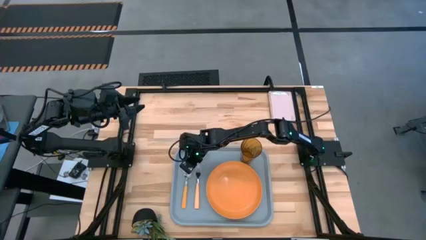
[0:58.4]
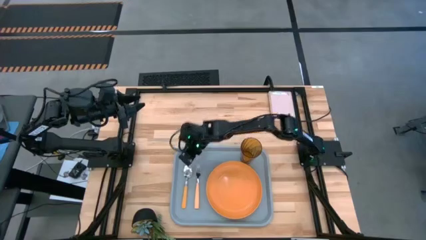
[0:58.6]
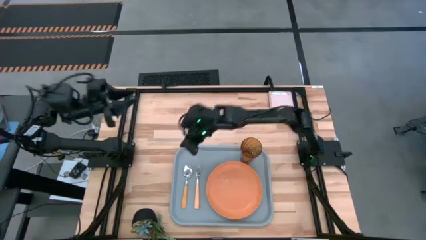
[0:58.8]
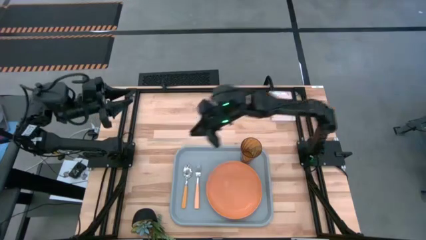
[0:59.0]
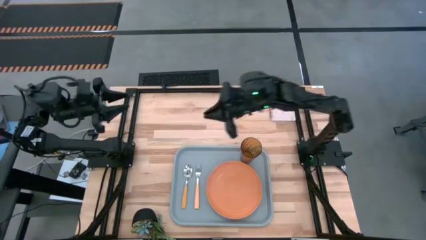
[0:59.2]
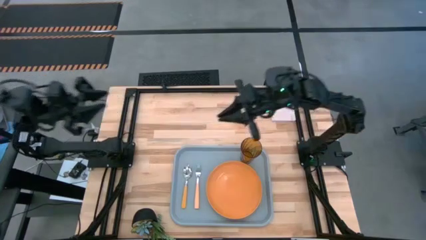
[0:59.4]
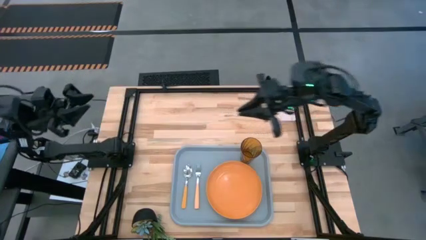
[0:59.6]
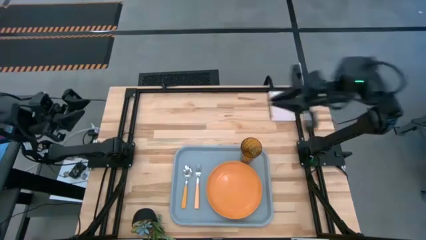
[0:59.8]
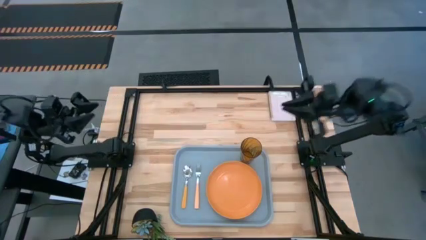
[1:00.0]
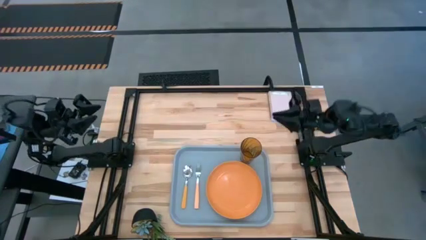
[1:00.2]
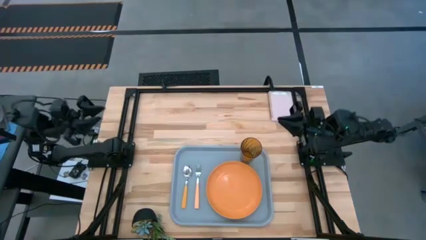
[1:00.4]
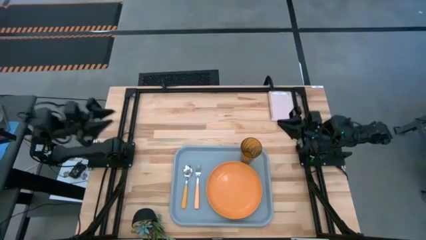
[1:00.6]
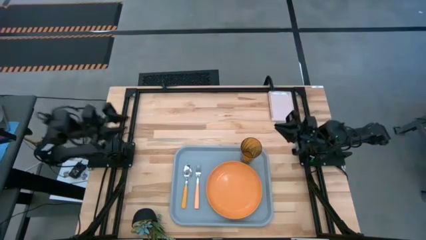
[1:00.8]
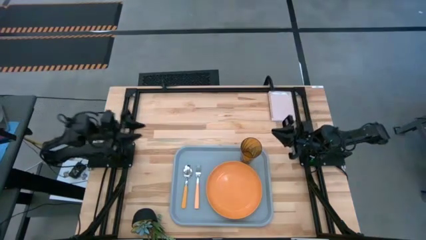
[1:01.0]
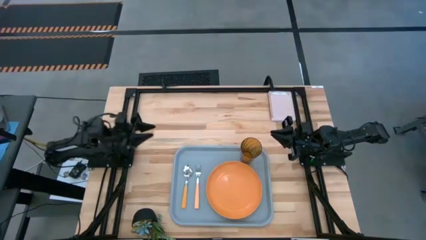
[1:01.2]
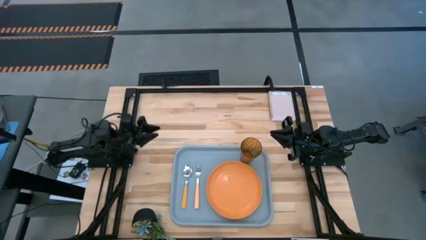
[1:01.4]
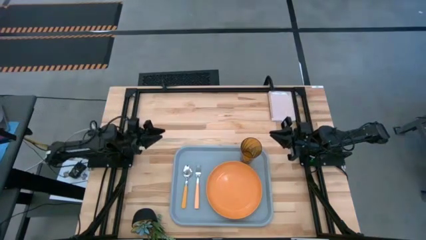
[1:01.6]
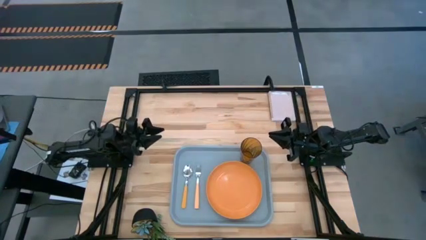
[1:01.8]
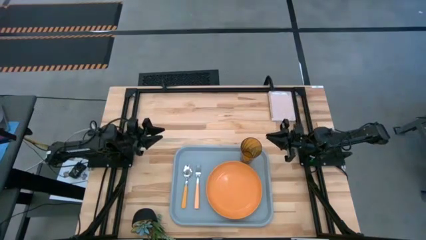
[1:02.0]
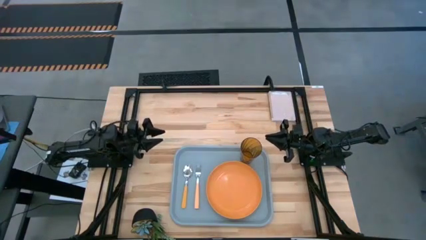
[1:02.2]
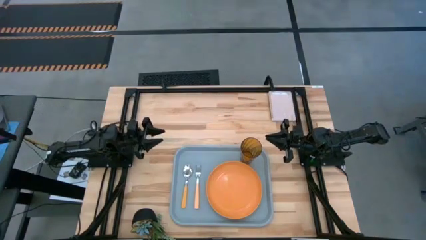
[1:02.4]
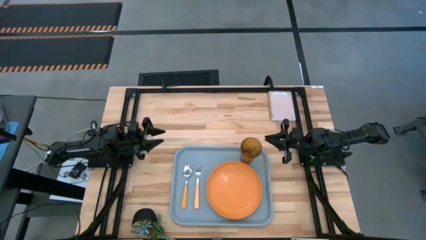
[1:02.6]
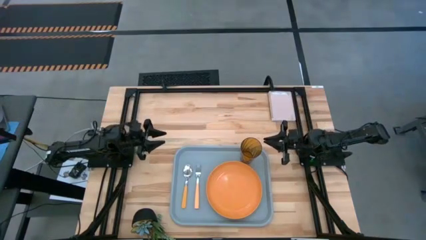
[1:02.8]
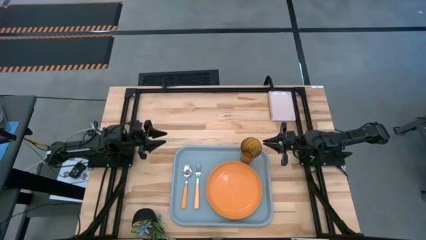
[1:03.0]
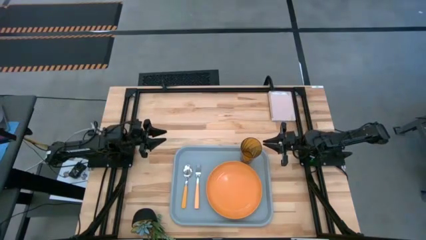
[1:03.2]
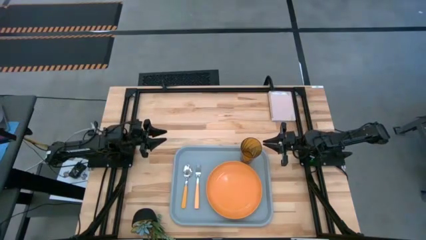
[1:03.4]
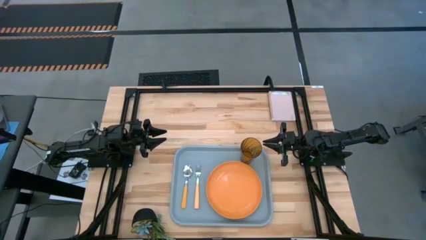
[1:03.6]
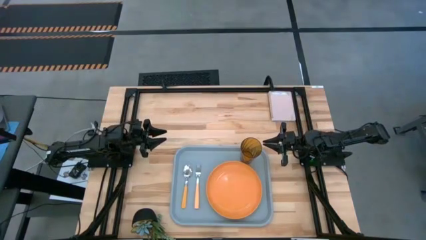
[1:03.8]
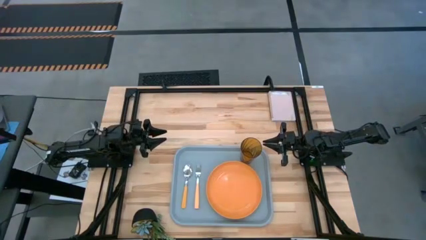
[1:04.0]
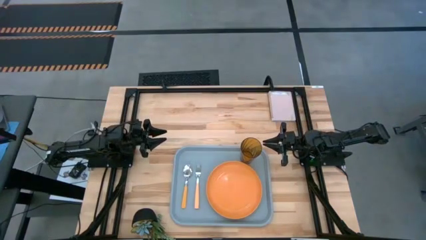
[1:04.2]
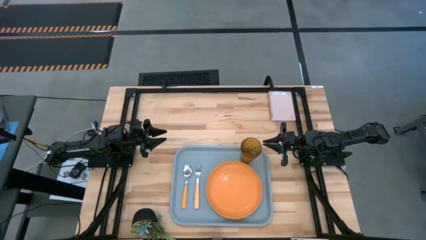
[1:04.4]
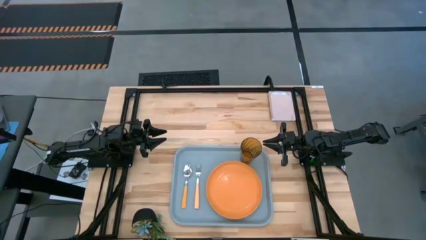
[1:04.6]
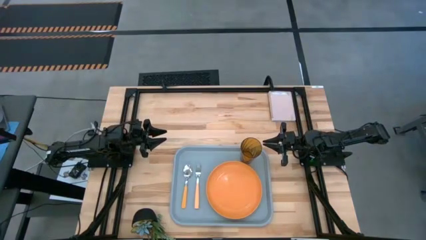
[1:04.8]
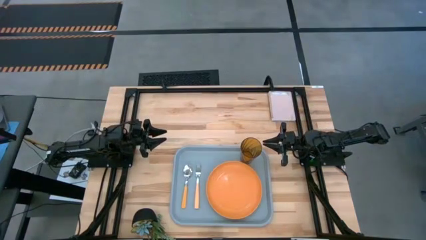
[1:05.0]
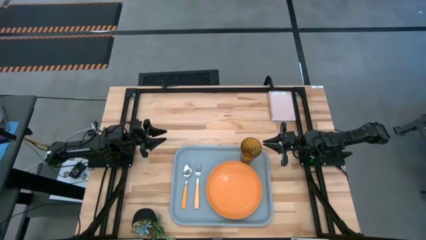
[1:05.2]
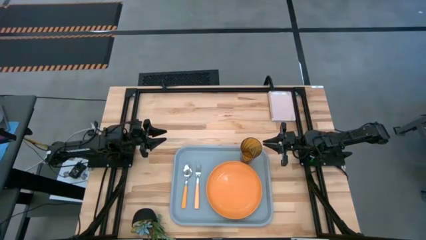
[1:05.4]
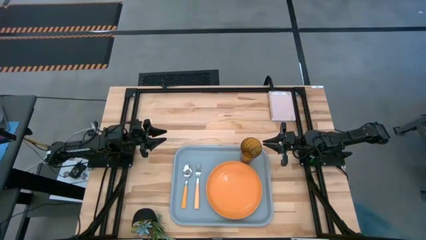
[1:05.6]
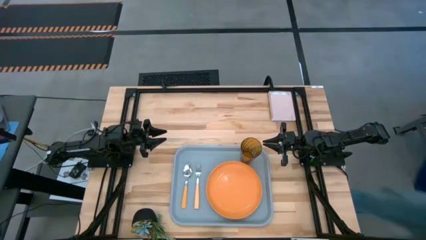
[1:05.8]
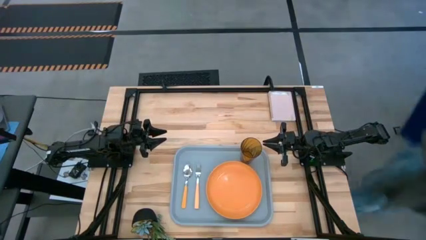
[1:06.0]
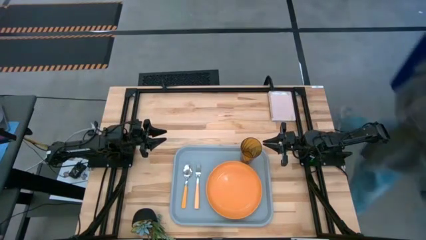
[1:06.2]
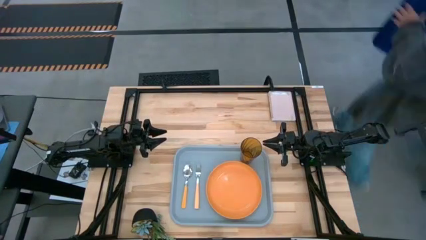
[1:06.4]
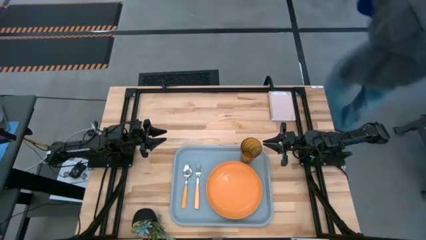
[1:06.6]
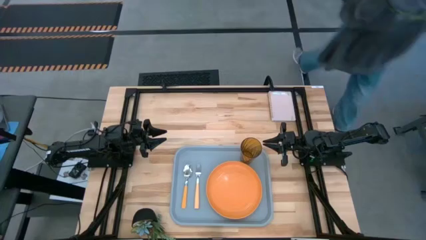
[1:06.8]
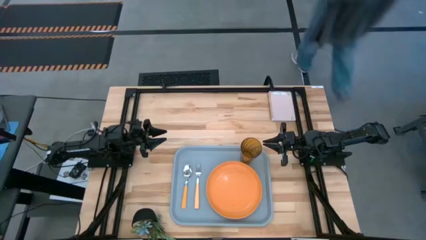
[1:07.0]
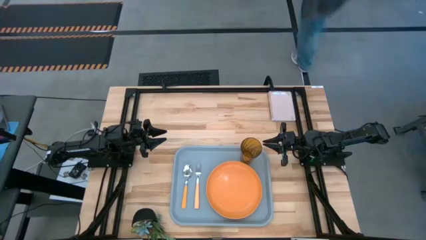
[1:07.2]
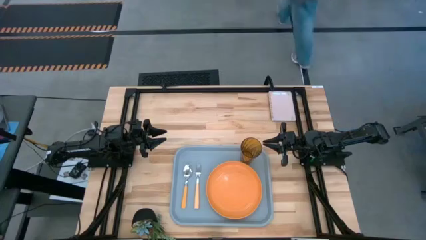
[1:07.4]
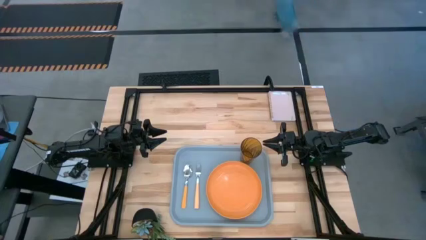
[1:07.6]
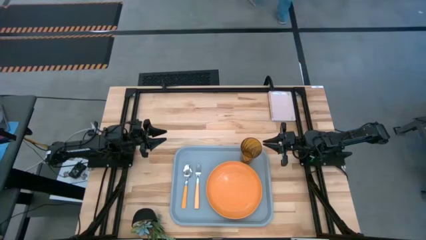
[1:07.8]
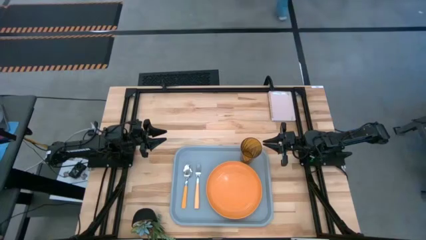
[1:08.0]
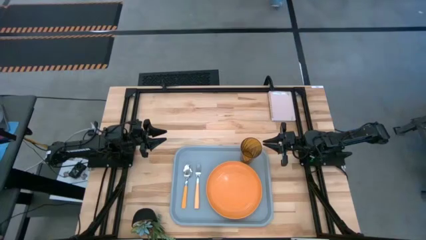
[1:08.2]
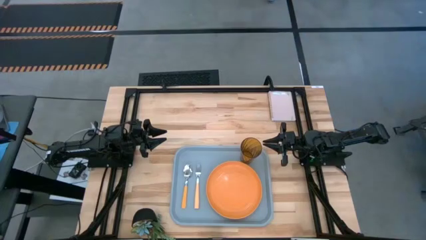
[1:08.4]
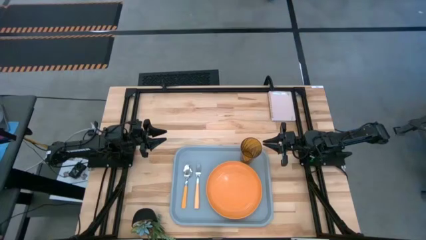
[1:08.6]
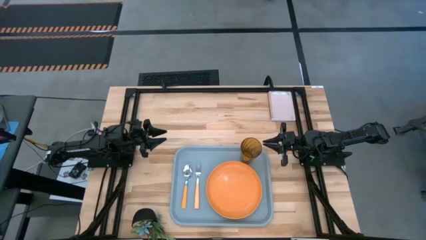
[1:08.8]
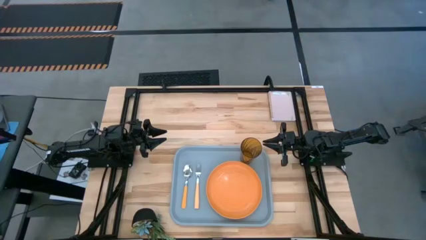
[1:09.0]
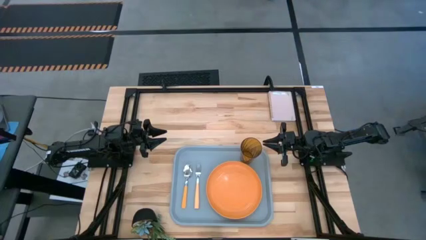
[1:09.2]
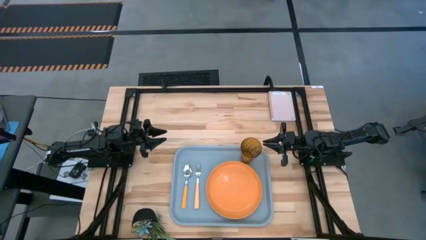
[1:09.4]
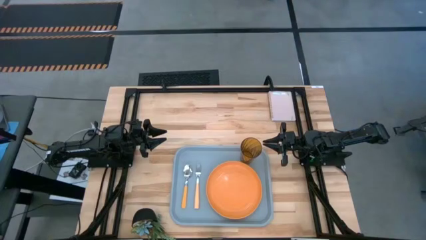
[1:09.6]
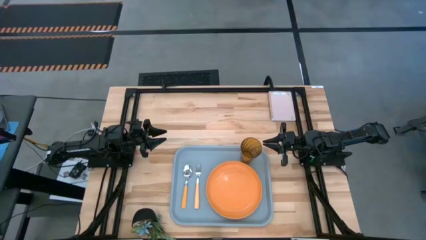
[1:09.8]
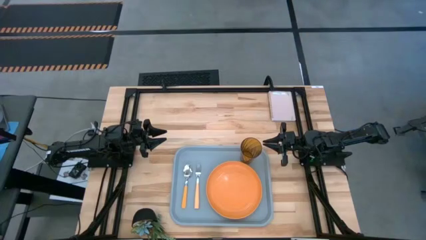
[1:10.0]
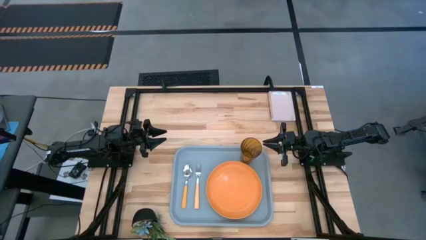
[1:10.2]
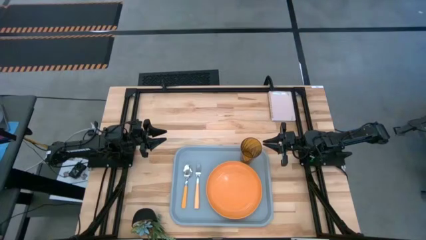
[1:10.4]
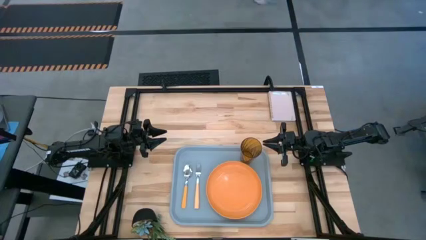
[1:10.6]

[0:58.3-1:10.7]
Task: Pick and place plate/cup/fork/spoon on tray
Return to Home Position

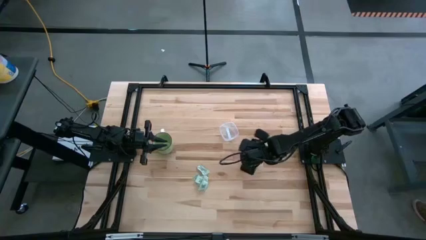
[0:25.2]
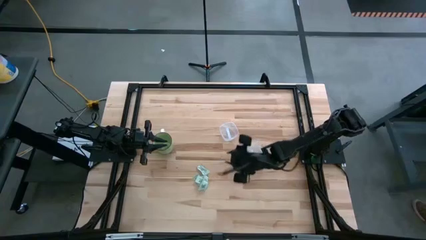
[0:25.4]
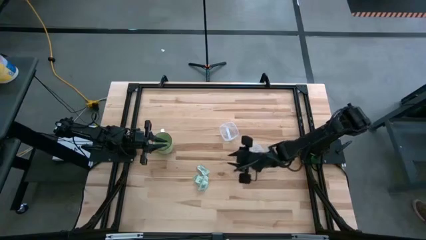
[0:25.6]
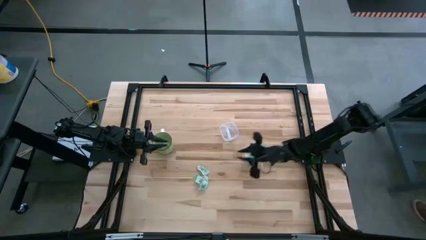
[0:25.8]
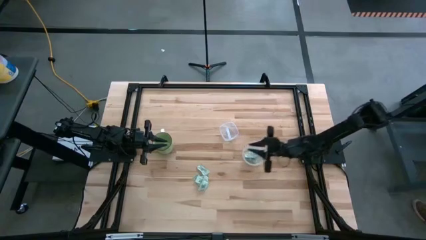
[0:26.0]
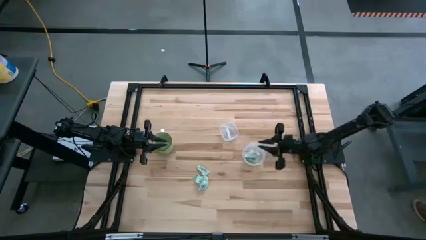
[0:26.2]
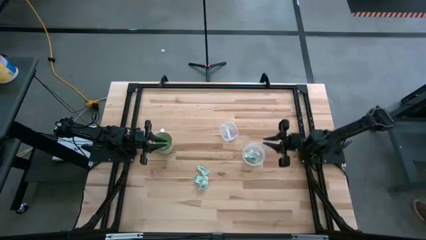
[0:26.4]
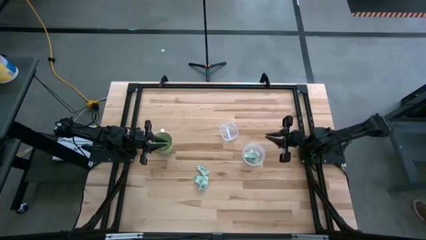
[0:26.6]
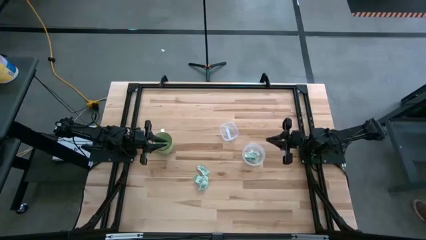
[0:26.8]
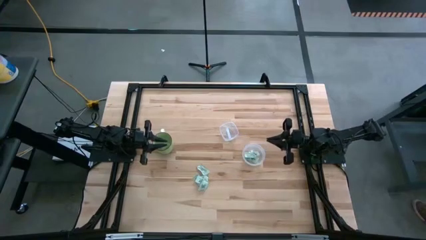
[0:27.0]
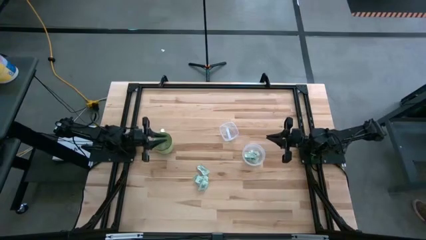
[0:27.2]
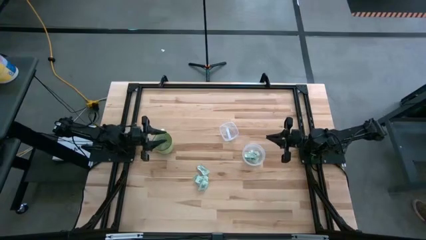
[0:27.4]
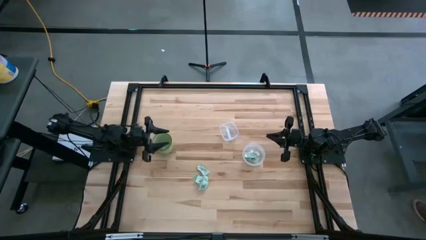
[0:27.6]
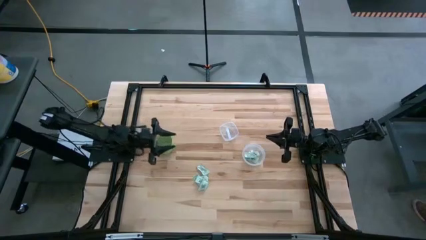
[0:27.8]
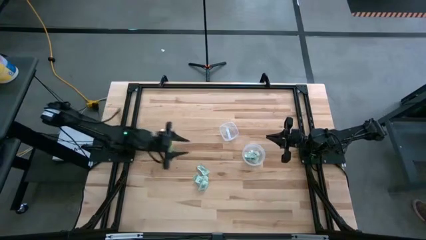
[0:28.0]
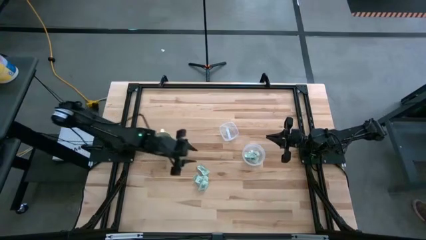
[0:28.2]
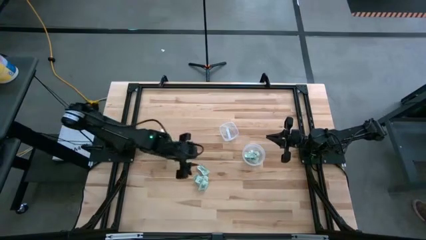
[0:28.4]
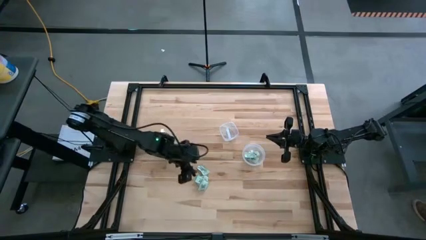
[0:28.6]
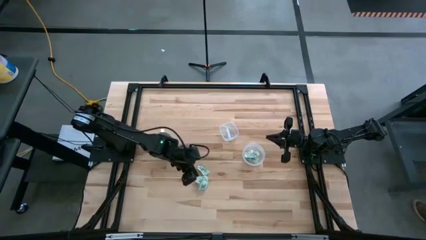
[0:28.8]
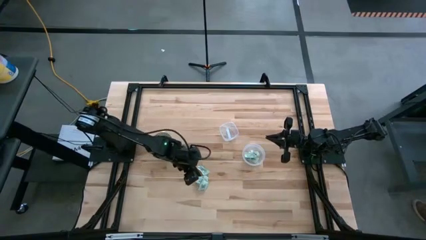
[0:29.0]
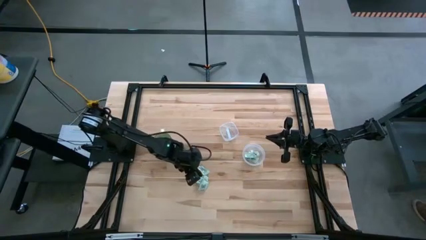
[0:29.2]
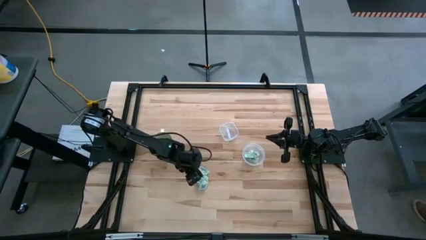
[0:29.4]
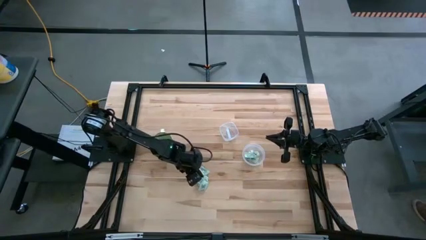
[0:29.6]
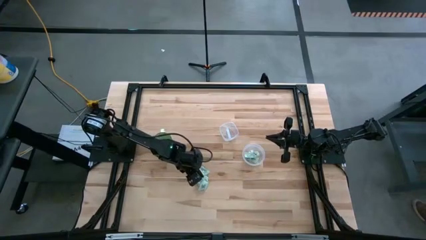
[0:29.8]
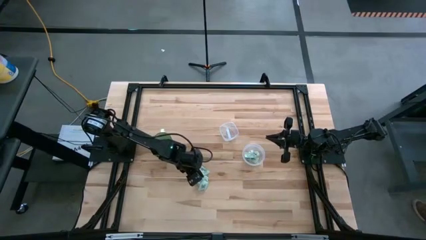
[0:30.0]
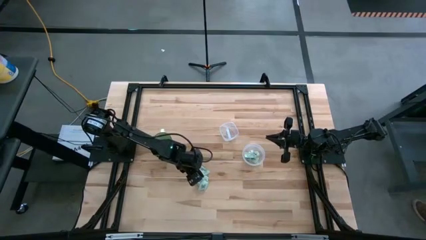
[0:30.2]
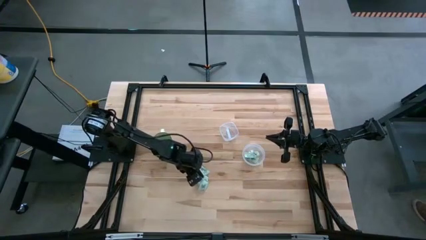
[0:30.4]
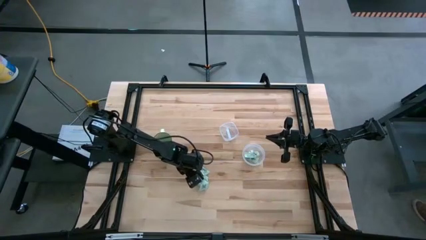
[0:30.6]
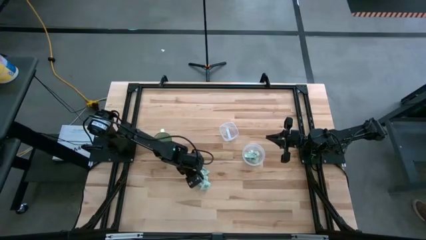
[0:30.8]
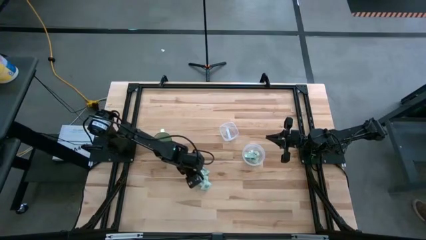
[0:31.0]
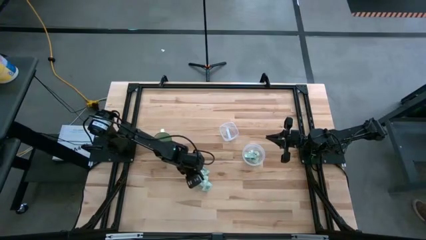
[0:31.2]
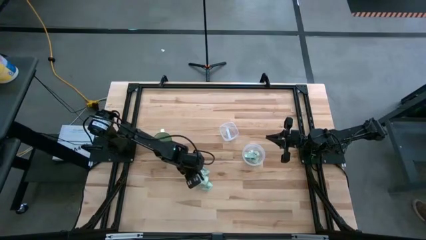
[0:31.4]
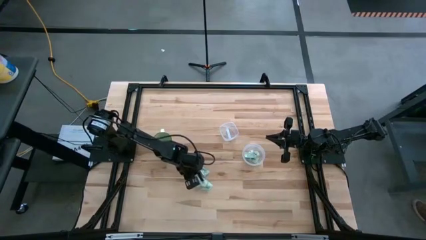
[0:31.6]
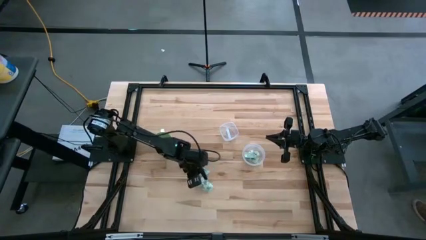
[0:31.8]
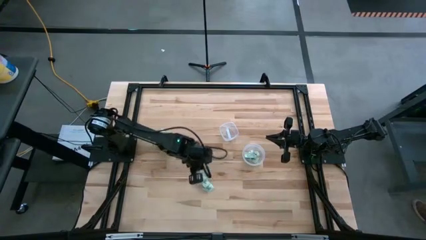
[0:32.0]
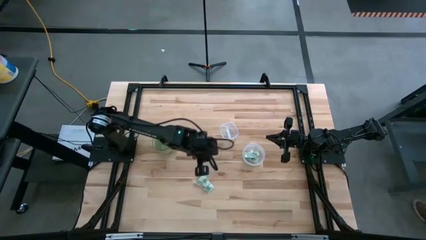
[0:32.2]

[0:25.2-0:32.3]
Task: Pick and place Stevia / Truvia into bins
Put the stevia packet into the top transparent container
